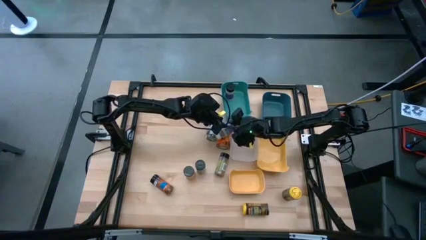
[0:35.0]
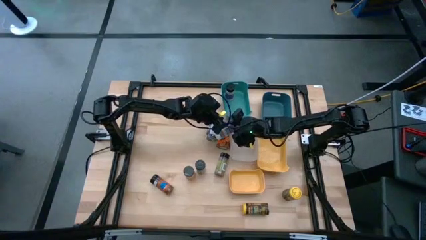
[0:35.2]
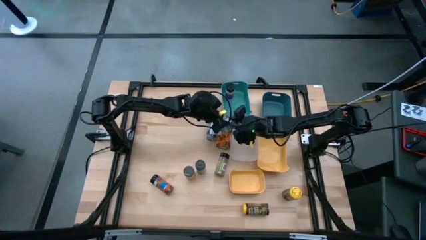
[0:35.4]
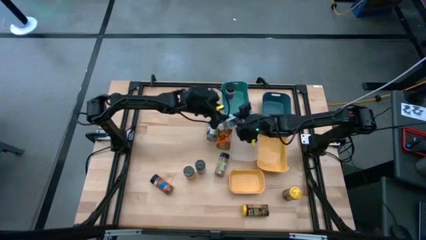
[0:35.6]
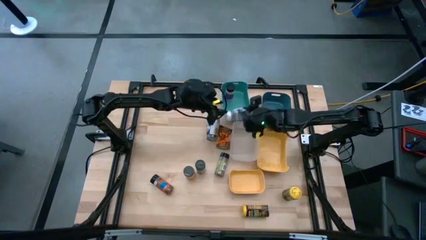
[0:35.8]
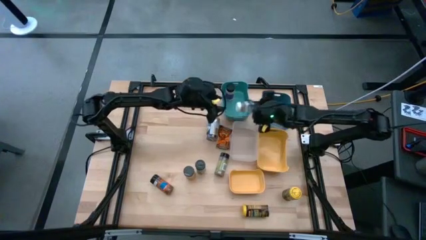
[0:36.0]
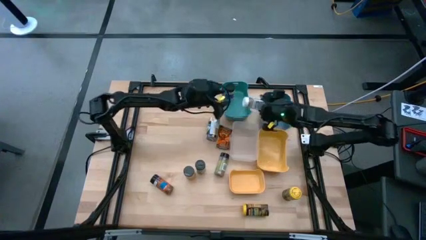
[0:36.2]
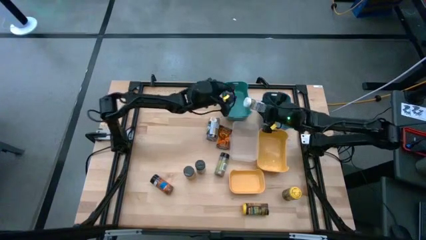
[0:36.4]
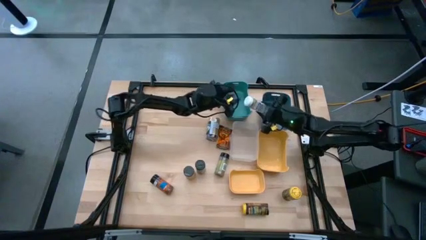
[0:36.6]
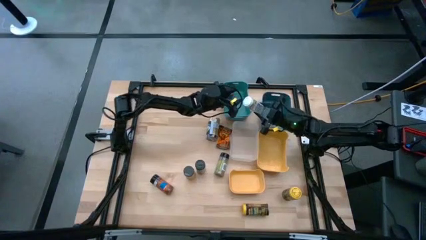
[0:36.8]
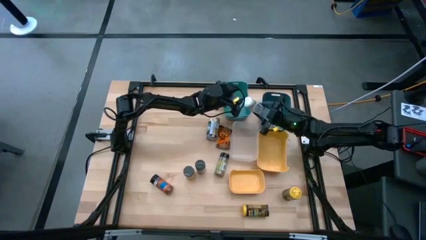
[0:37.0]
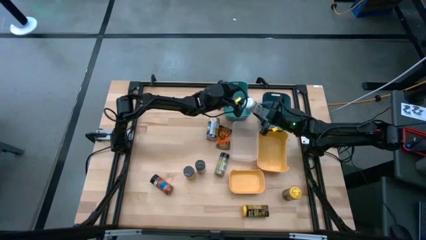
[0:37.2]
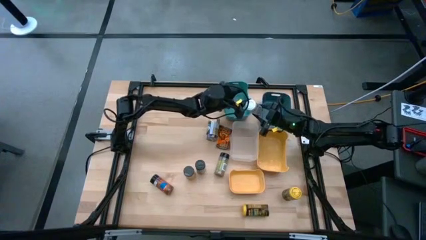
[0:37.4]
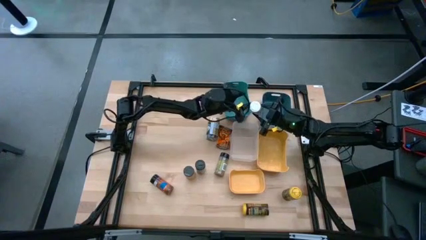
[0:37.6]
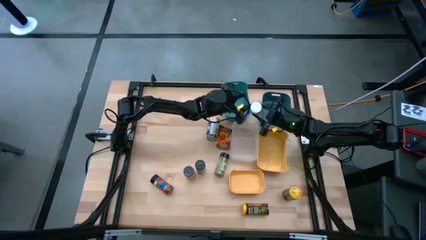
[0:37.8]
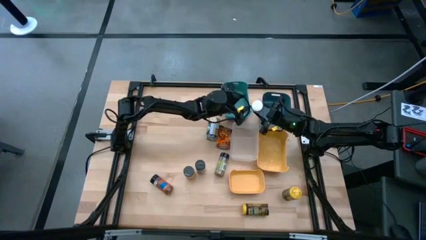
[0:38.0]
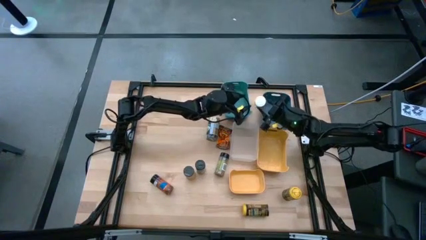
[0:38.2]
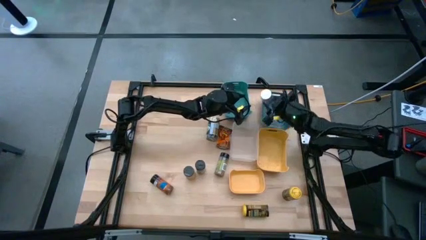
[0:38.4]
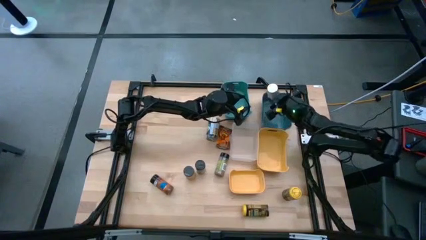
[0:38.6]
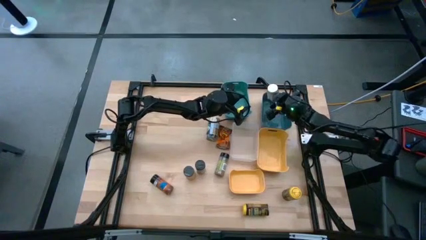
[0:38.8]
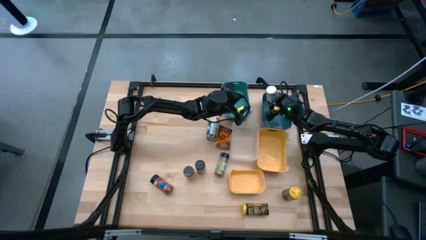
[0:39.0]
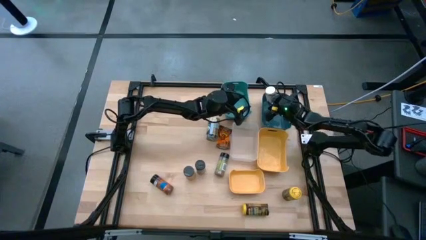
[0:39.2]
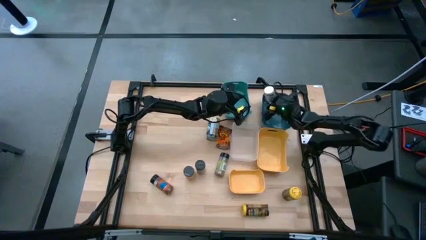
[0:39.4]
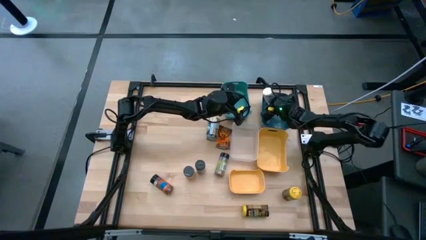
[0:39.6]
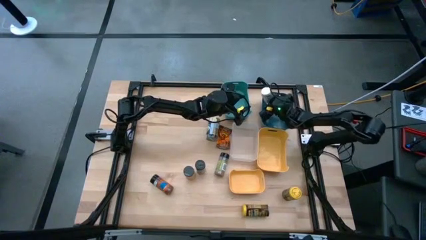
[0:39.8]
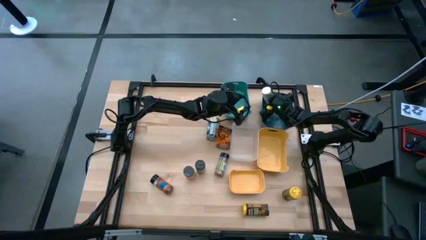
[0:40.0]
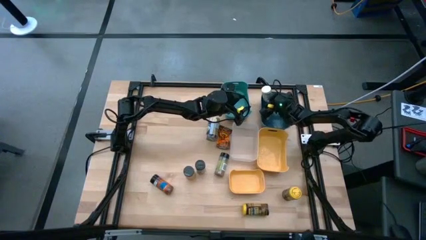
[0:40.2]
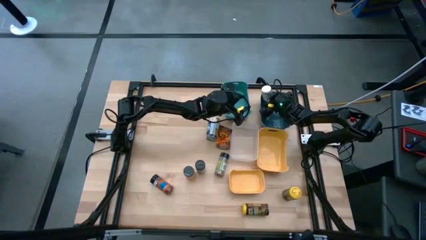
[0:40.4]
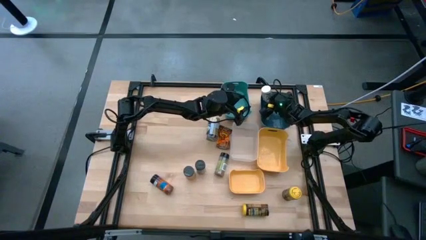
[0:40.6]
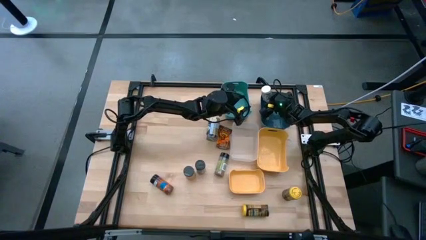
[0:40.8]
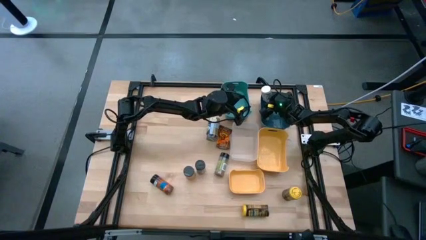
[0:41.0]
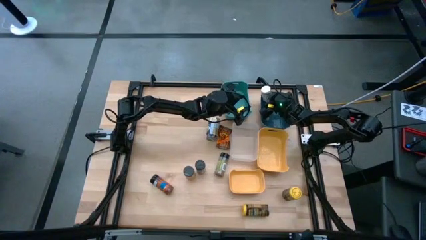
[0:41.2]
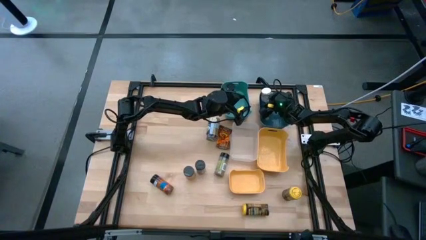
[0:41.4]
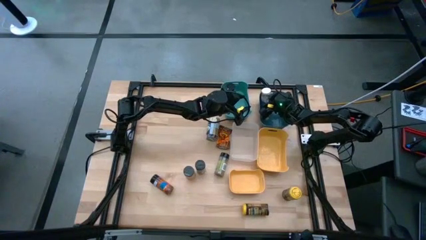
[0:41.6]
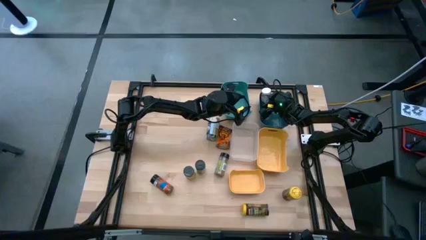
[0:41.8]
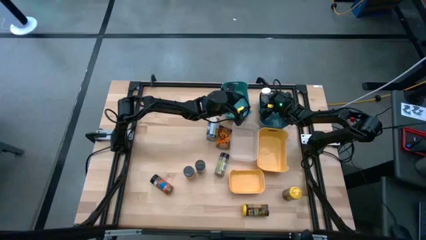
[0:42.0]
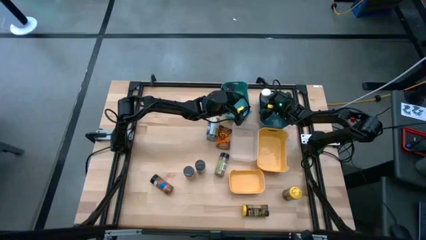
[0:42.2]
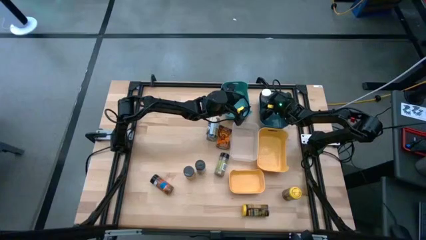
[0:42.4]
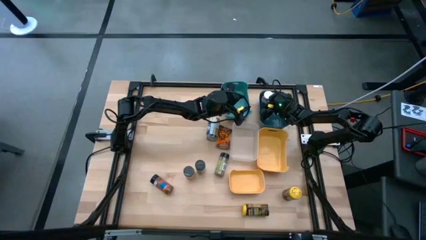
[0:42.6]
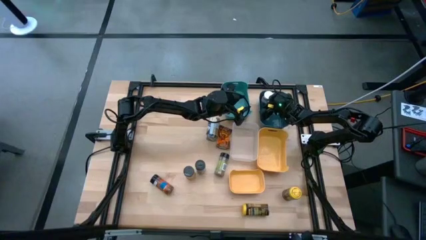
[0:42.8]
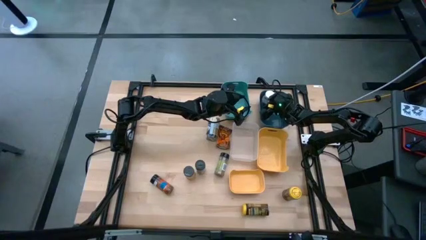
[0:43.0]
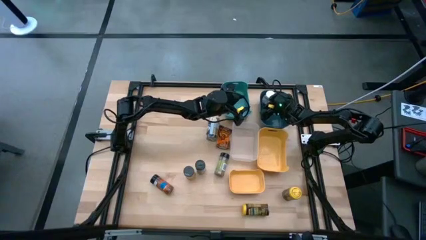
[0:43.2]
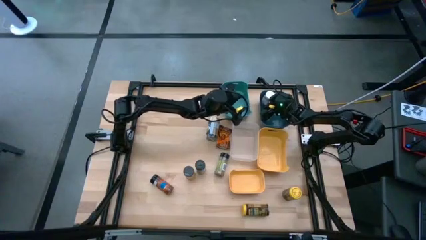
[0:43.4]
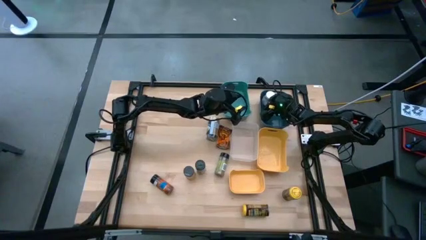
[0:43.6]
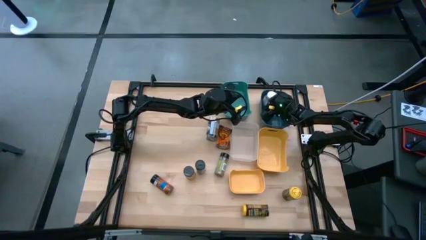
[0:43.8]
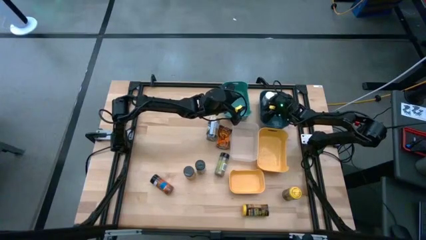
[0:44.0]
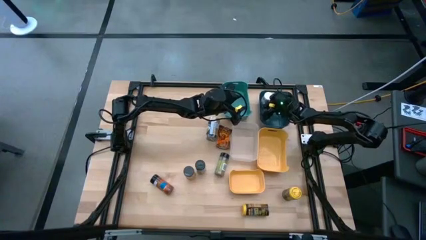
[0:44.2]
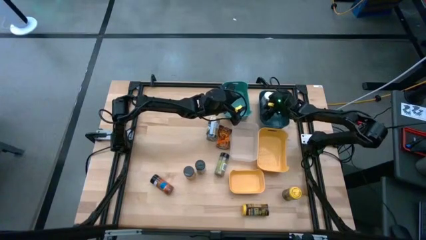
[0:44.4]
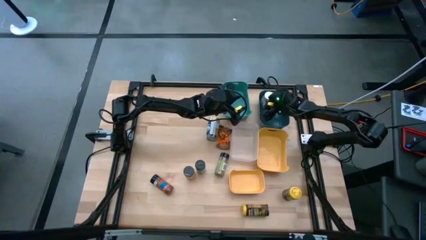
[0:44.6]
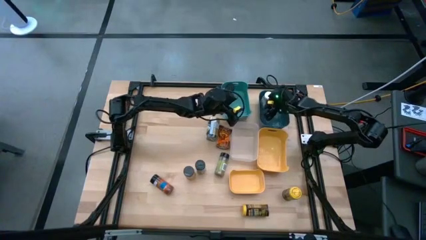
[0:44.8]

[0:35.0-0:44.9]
Task: Sort spices by type
Put the white seasoning into the blue bin

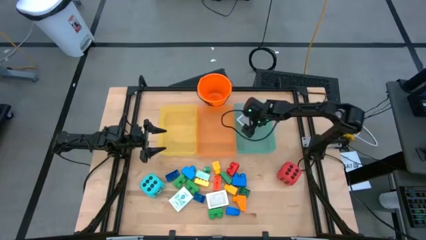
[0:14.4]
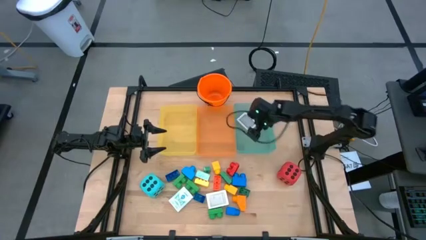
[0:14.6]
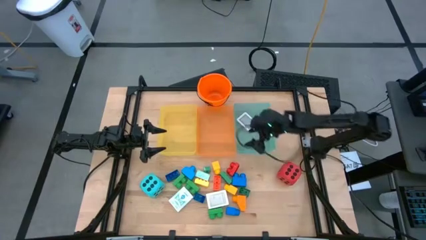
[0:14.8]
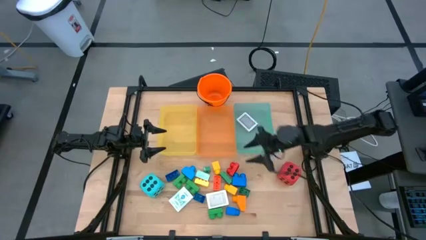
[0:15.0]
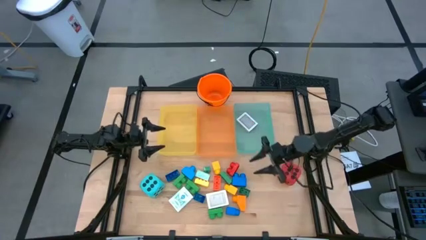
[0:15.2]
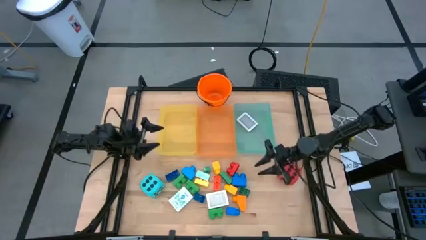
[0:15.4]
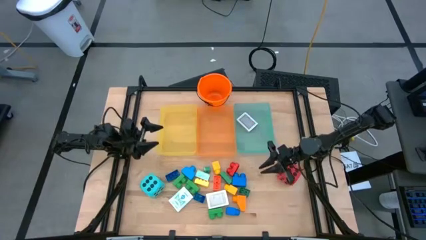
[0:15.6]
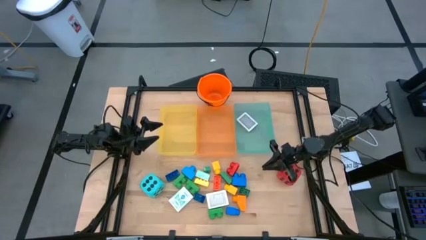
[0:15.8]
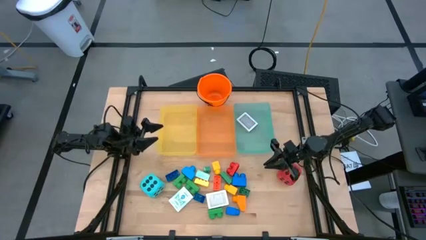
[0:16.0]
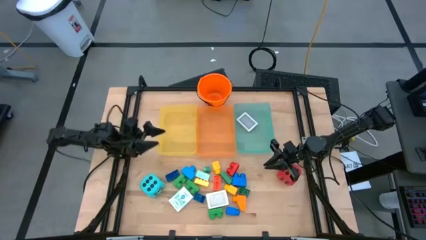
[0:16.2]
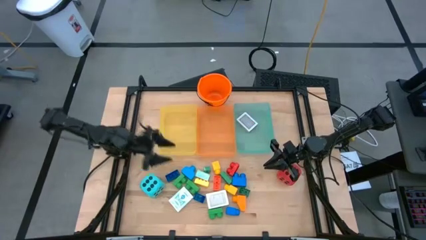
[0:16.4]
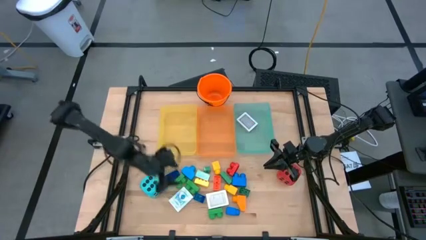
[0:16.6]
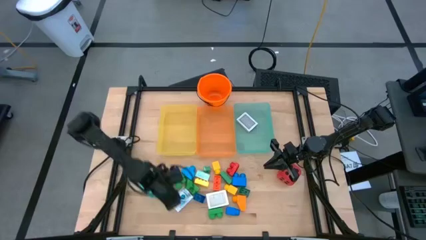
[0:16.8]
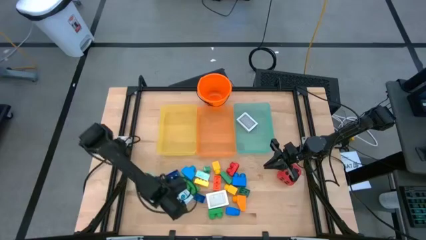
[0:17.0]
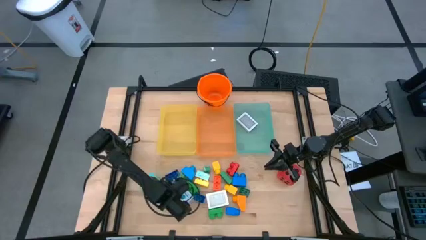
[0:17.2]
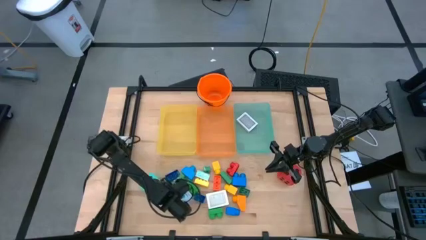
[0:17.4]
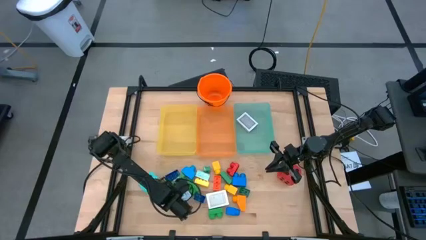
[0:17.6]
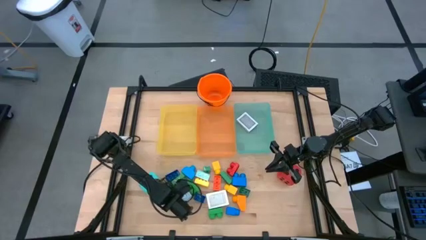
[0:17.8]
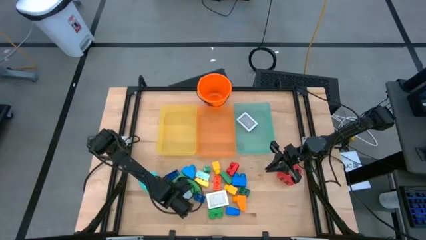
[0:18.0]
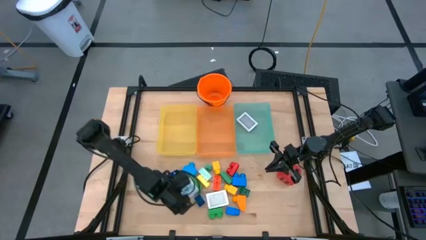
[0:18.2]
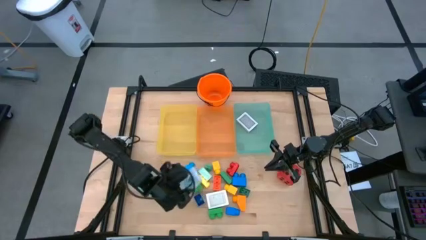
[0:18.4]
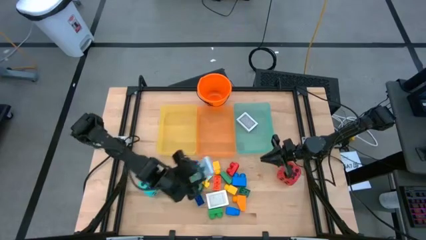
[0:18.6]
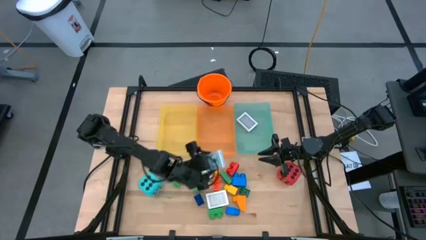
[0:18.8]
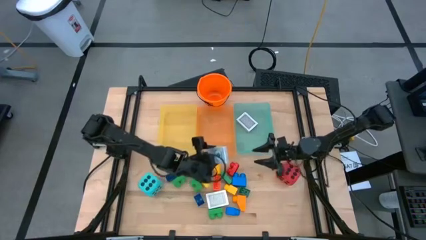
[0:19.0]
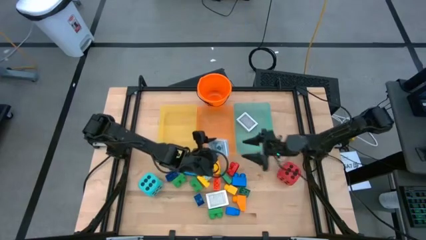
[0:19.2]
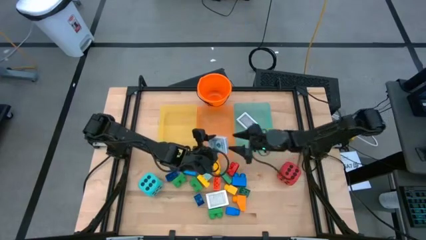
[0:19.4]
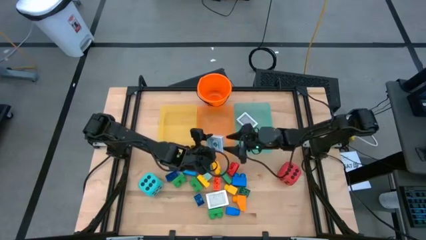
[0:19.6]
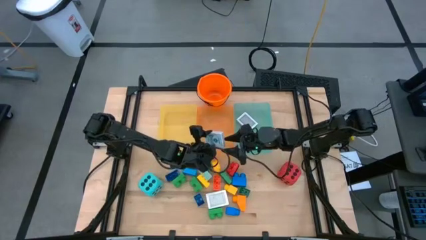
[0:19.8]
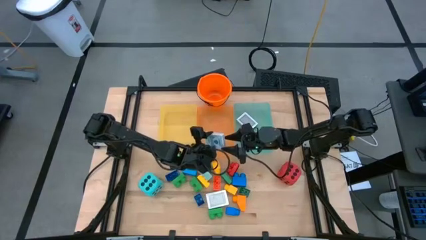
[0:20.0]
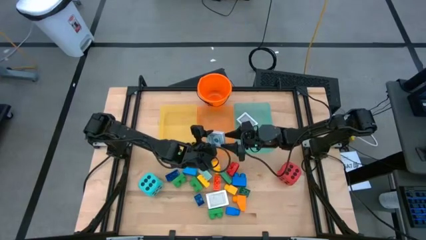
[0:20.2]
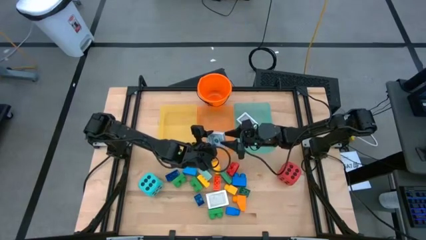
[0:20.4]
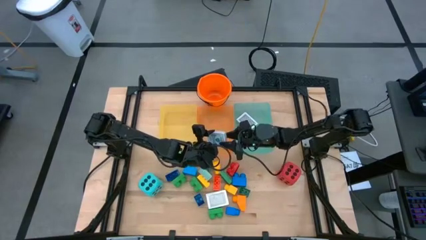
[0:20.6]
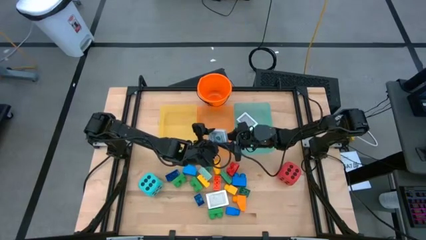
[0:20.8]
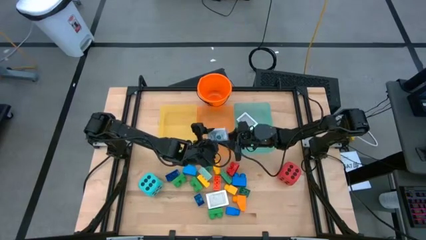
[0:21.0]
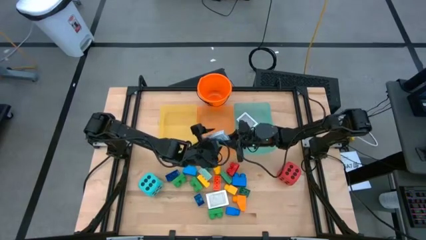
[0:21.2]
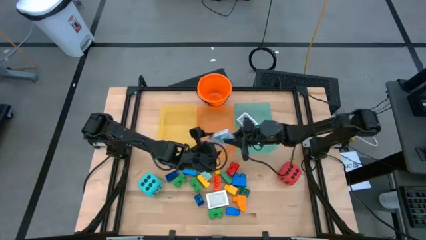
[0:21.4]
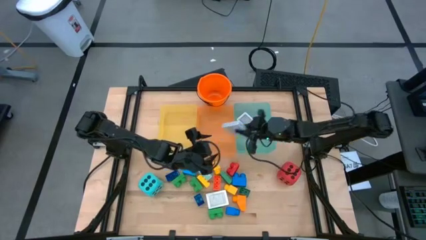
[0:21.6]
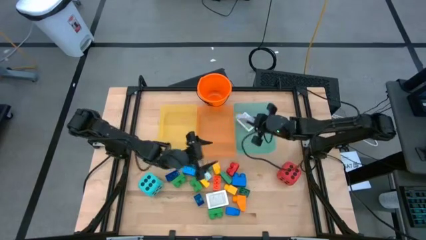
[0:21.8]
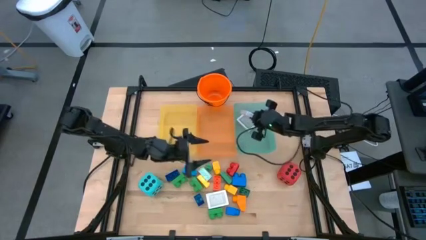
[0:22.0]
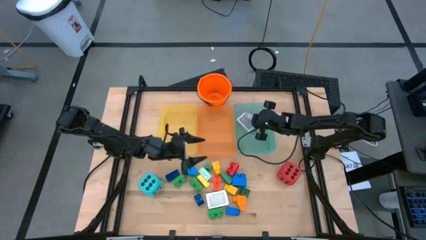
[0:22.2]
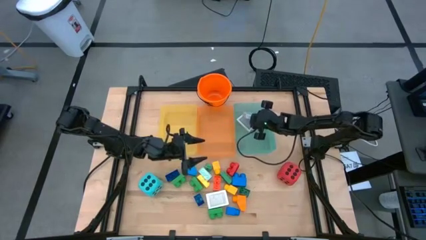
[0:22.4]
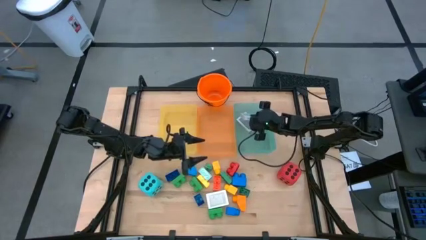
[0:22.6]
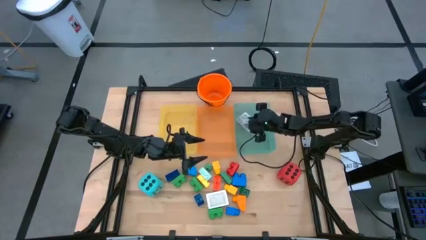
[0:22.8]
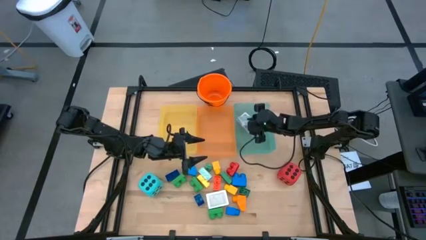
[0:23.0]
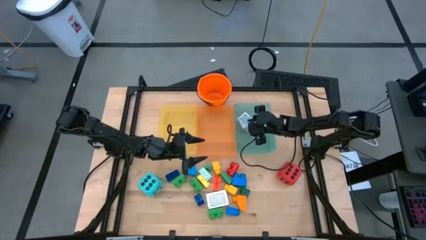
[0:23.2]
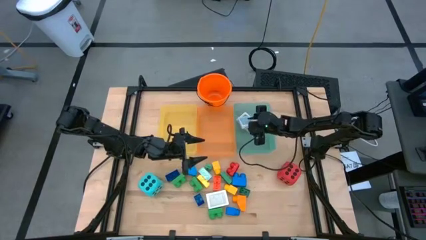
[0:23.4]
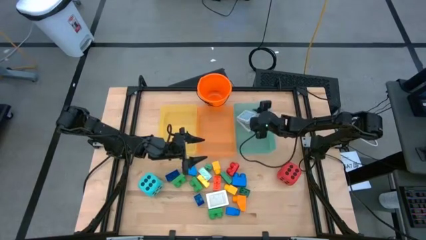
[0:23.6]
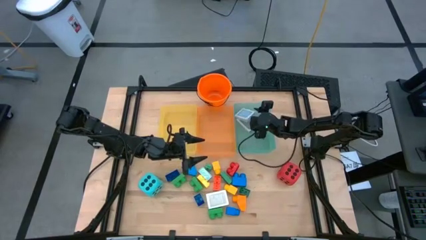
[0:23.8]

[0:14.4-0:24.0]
Task: Pick & Place Toys
Put the blue deck of cards into the blue bin
